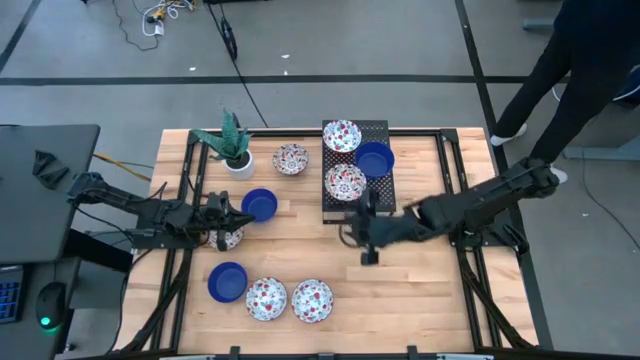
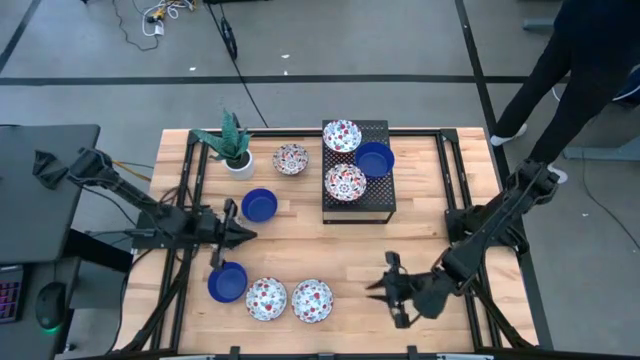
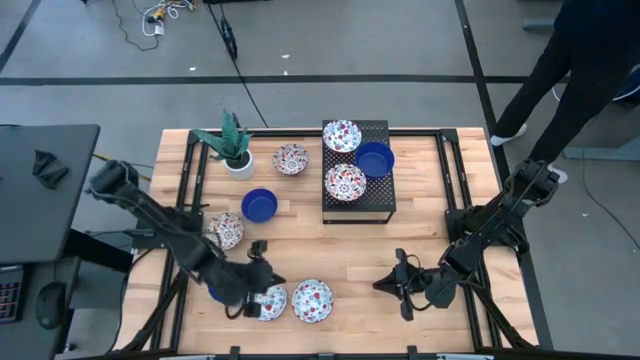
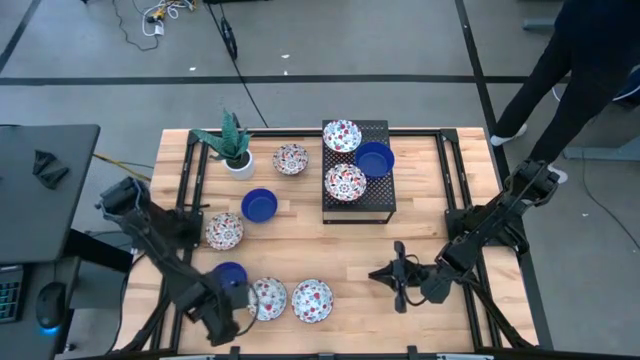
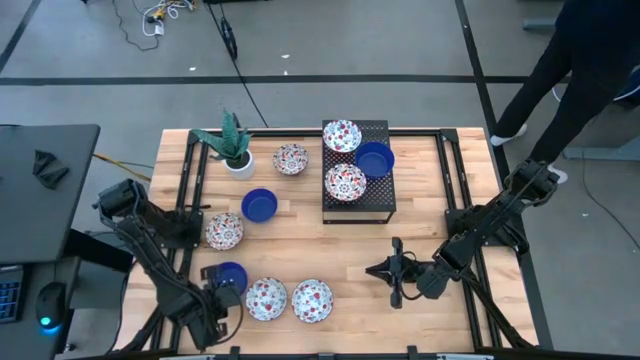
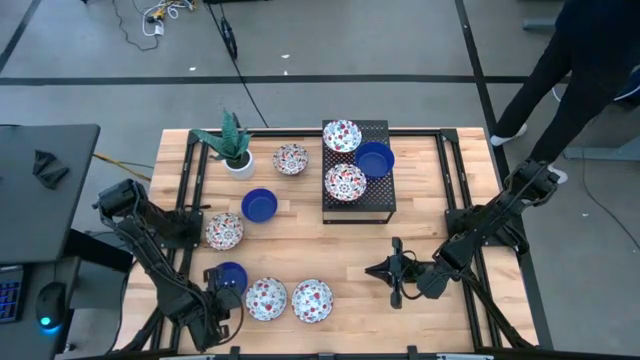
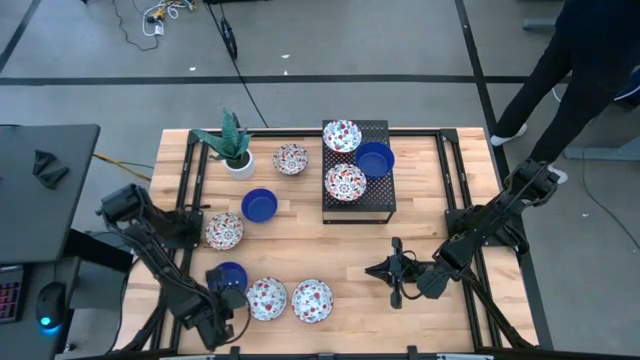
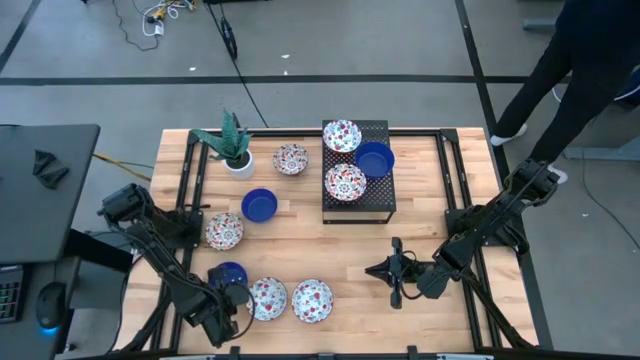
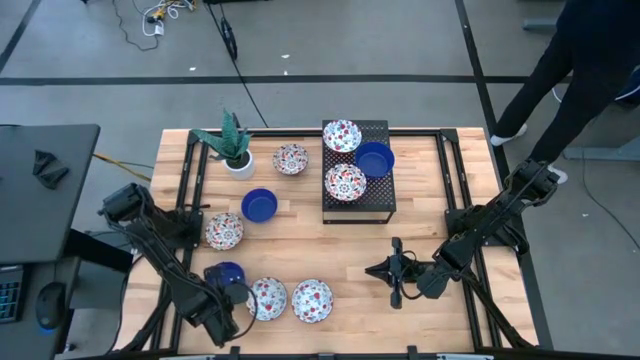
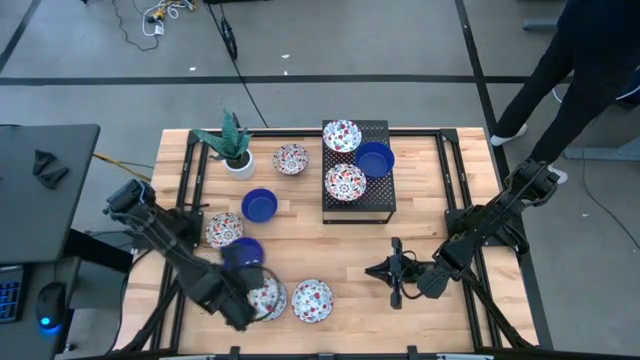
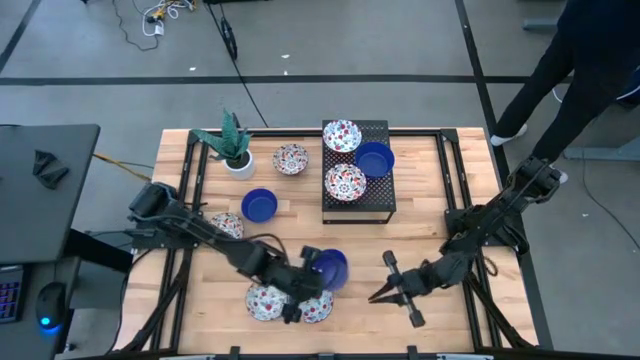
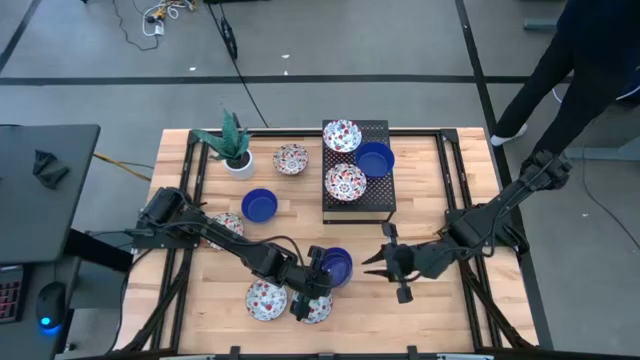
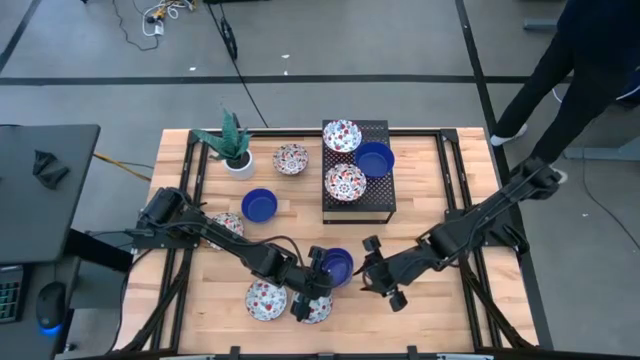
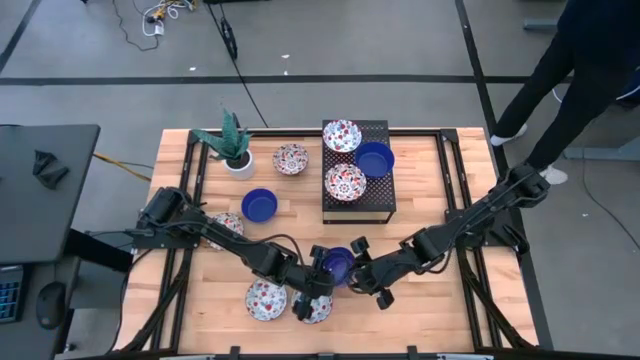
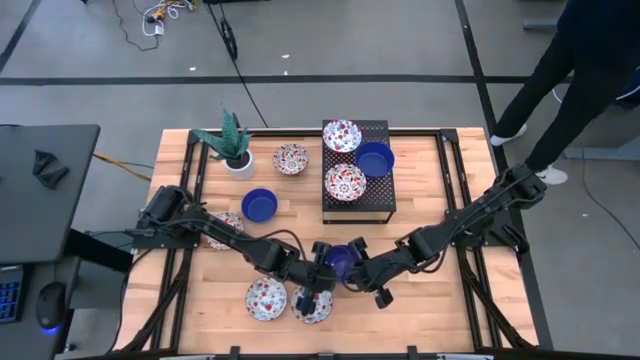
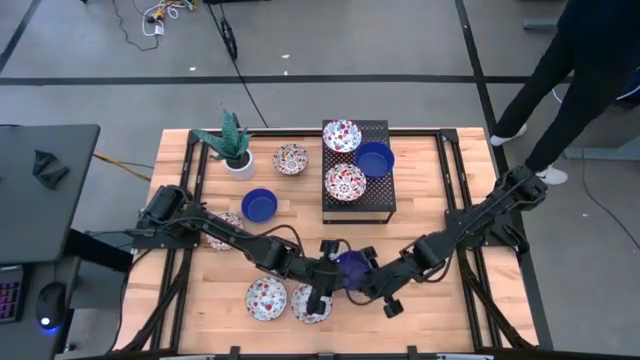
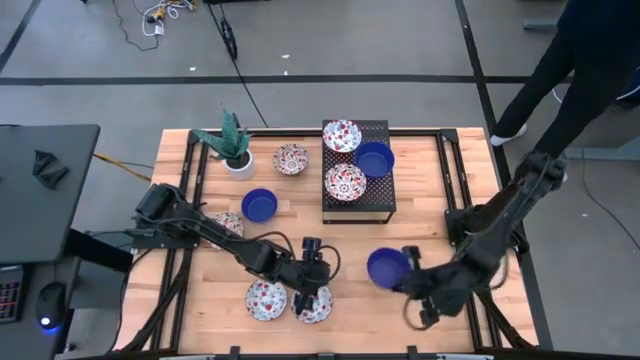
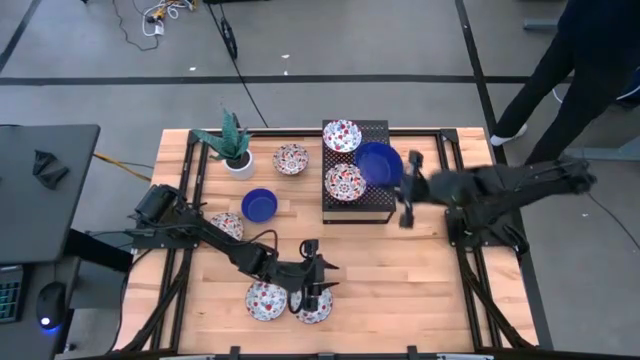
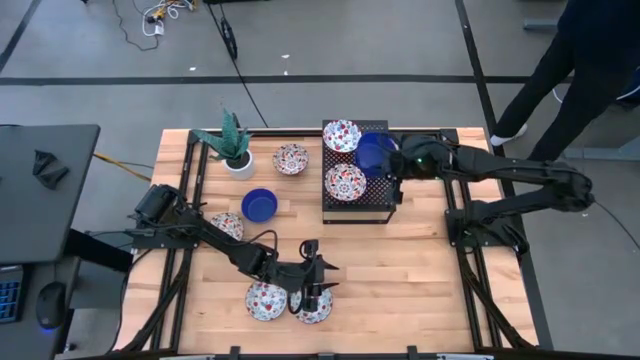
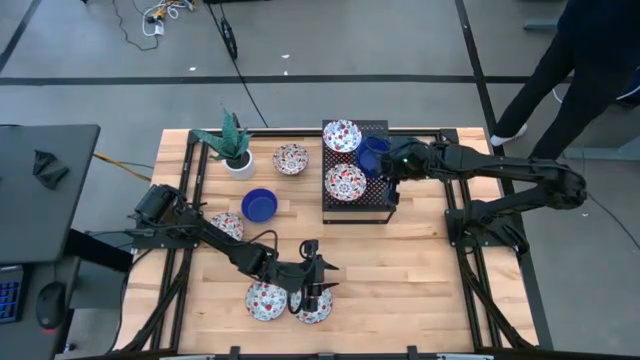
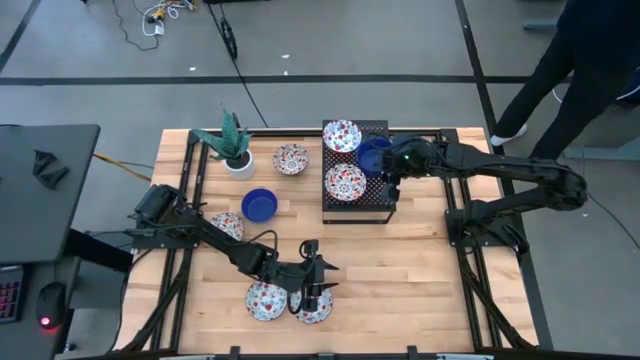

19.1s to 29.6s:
Task: Pick & Place Mini bowls
Stack the bottom blue bowl on top of the blue bowl on the shelf

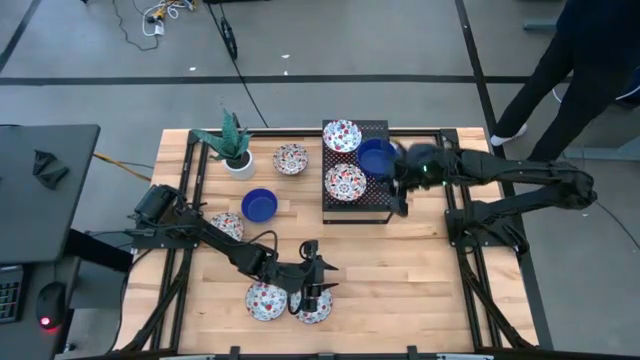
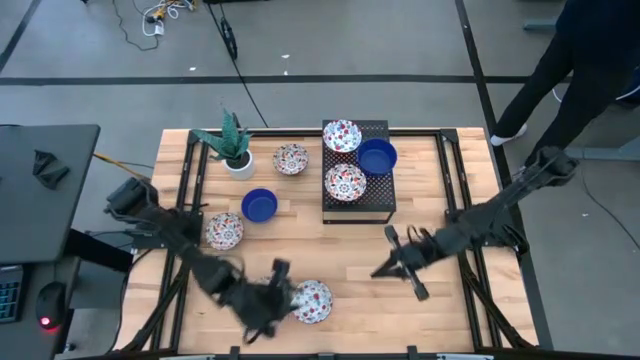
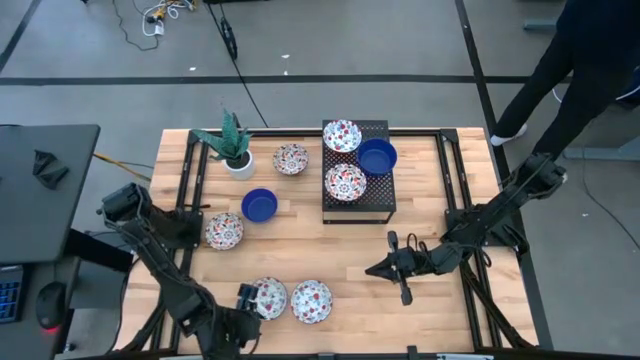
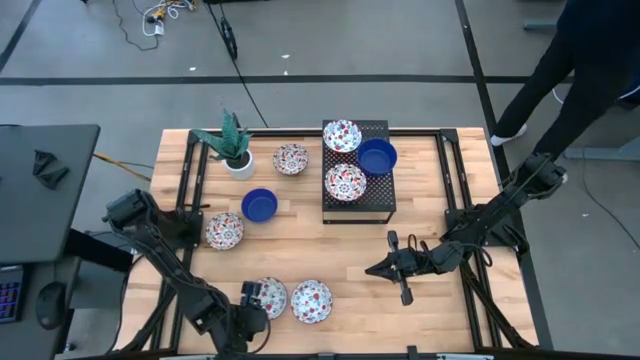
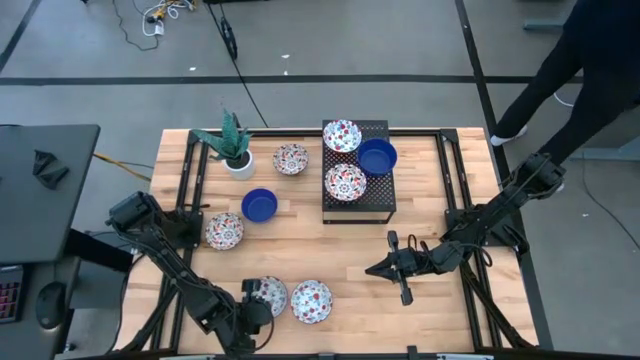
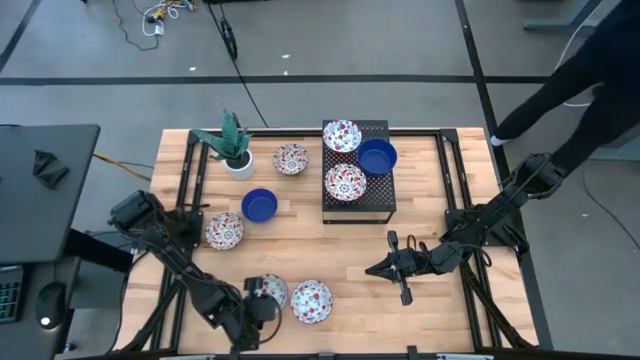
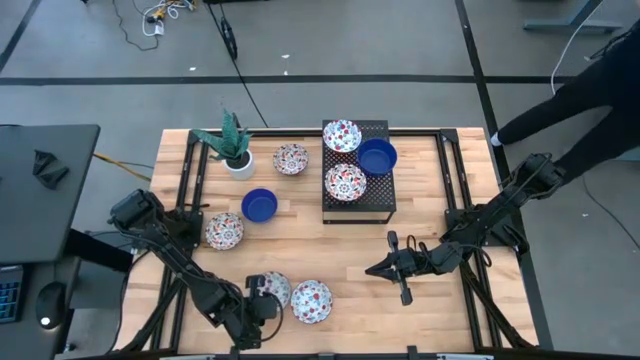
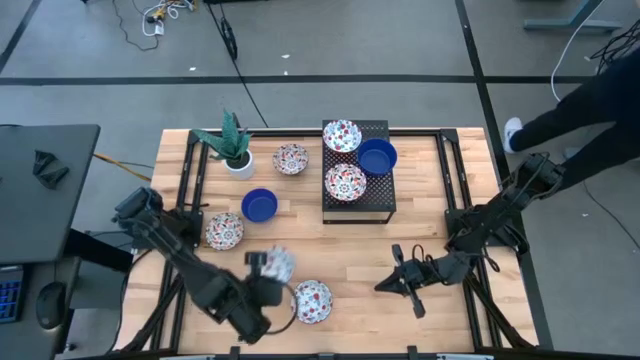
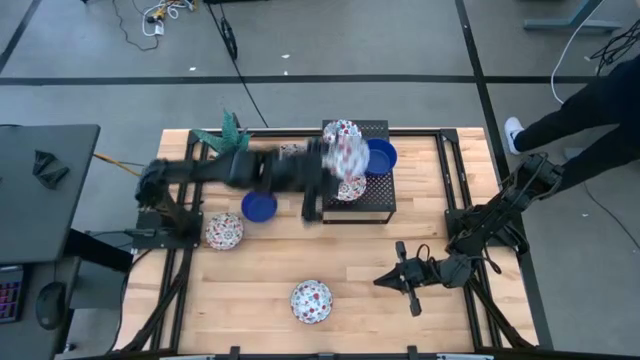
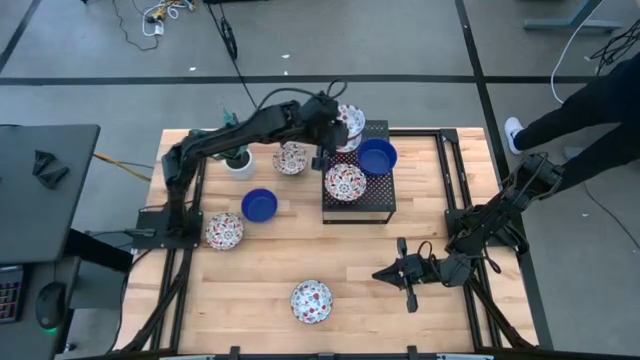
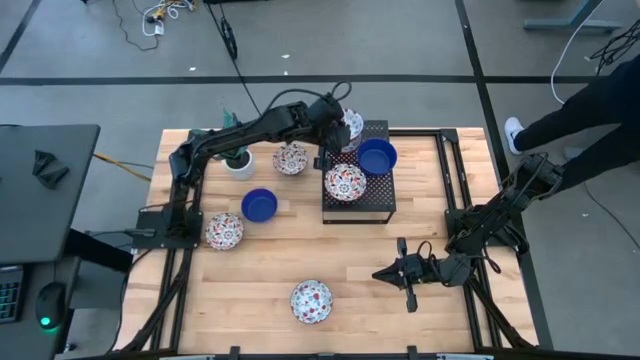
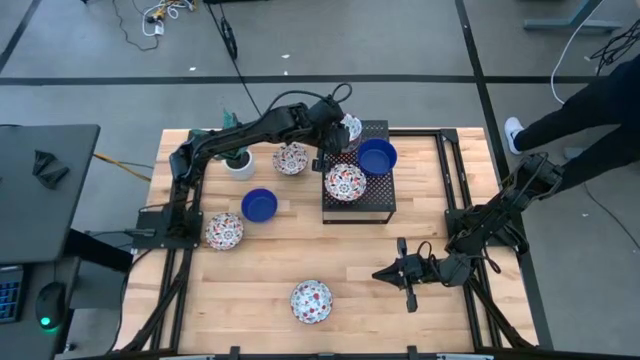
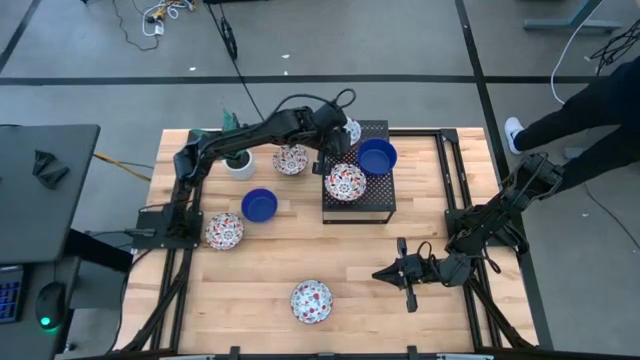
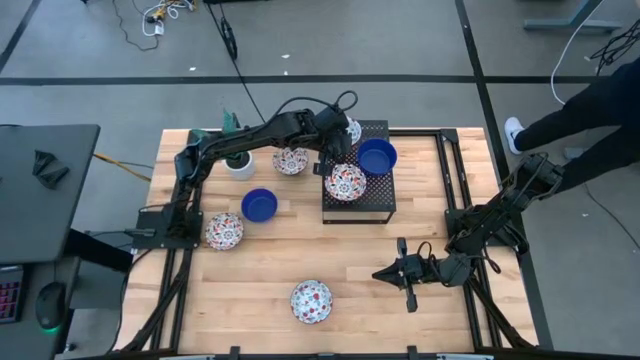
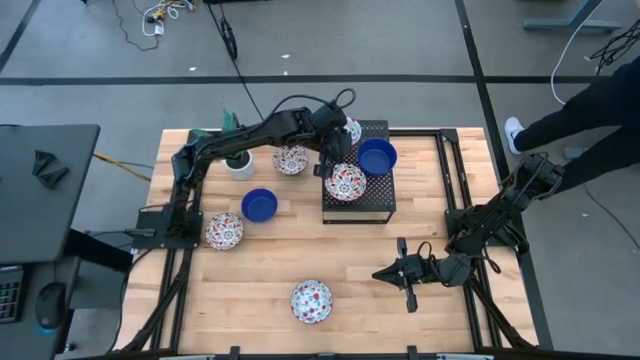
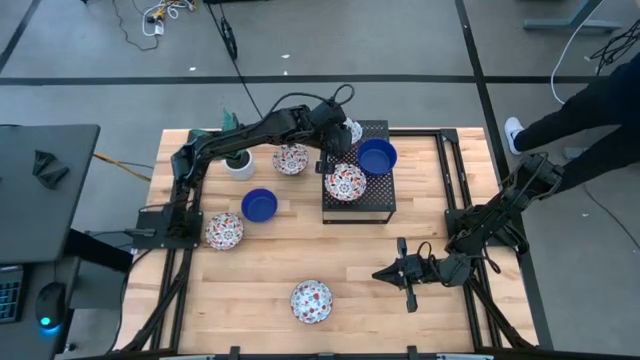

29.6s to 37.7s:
Stack the left red white bowl on top of the red white bowl on the shelf

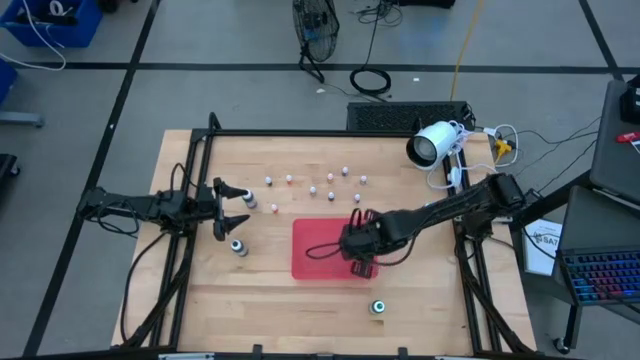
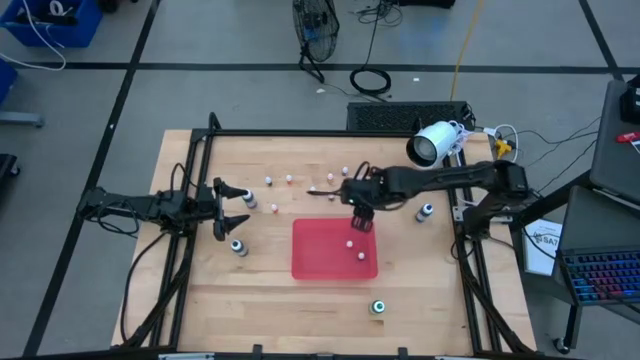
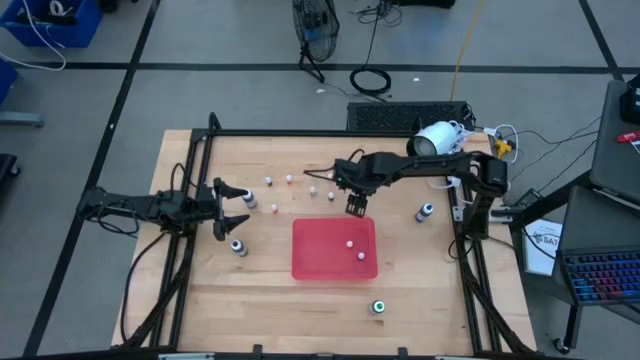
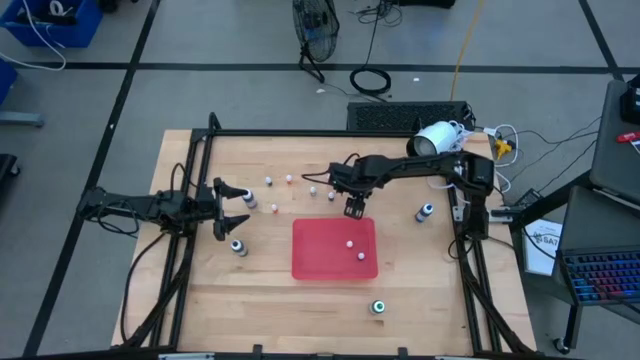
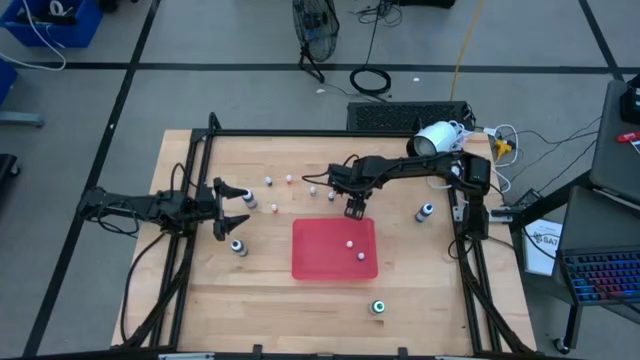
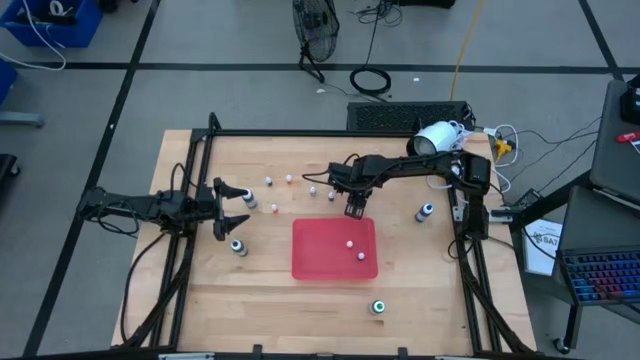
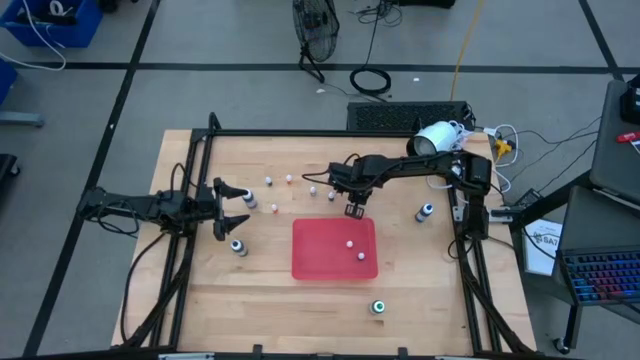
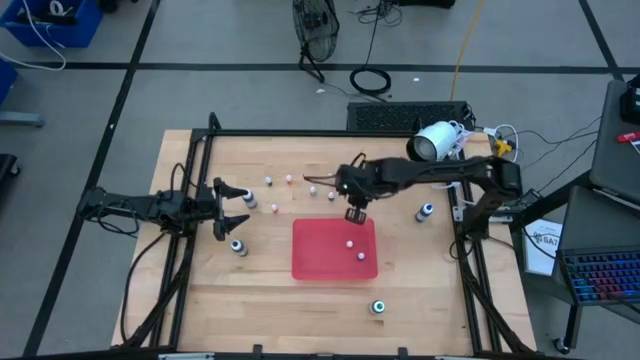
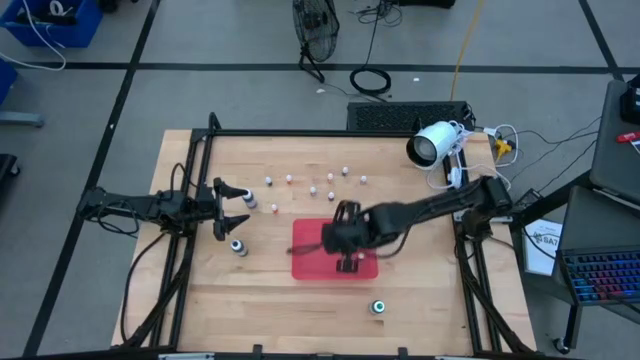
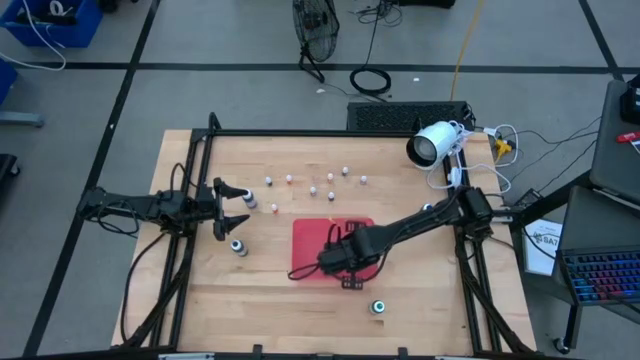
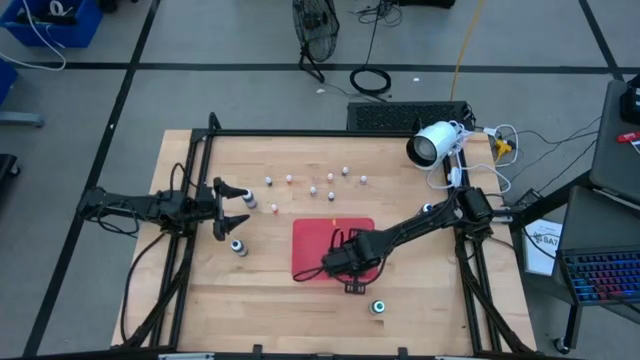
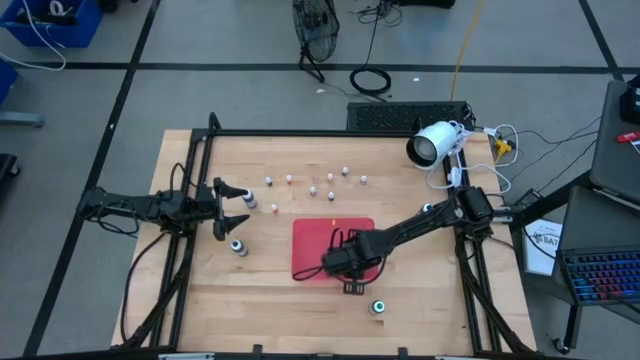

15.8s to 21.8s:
Task: Pick & Place food coloring
Put the small green food coloring bottle into the pink bin
